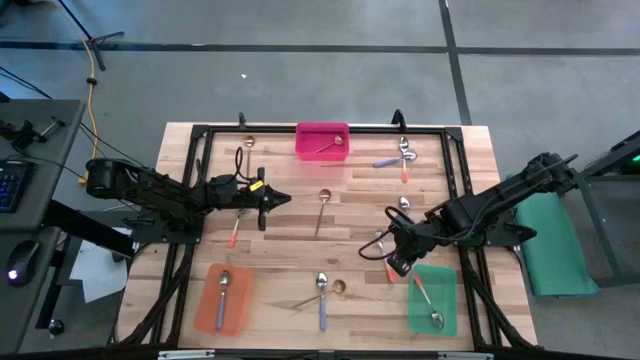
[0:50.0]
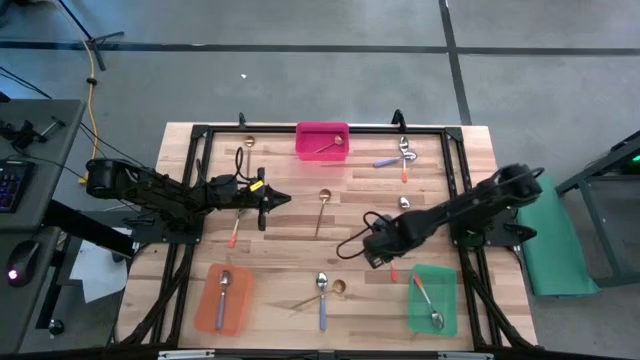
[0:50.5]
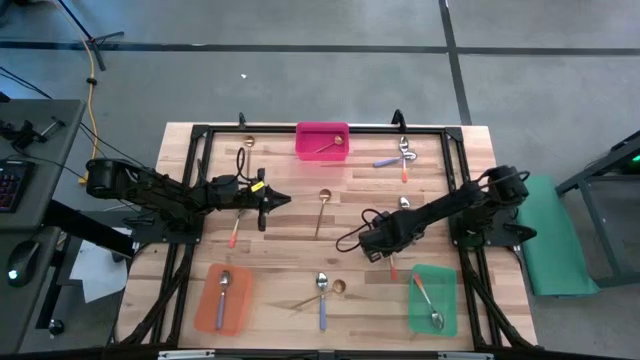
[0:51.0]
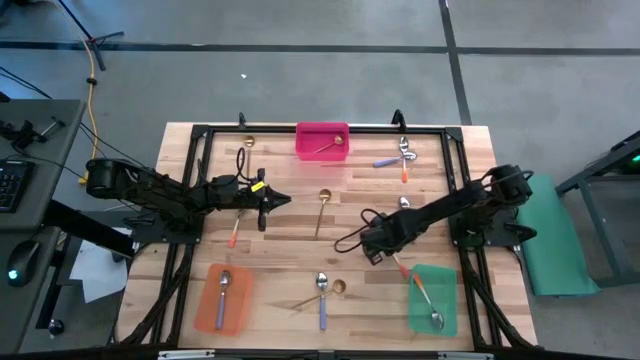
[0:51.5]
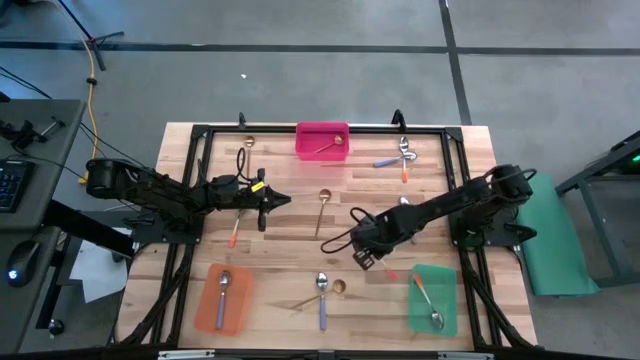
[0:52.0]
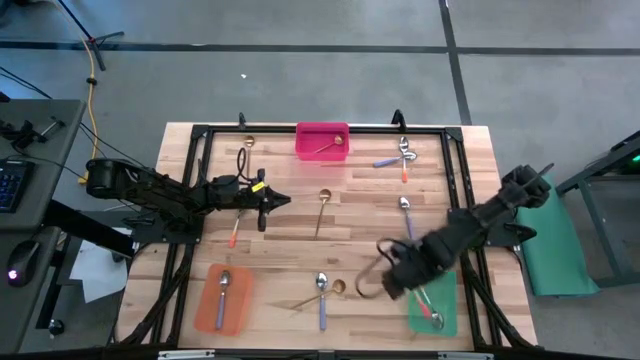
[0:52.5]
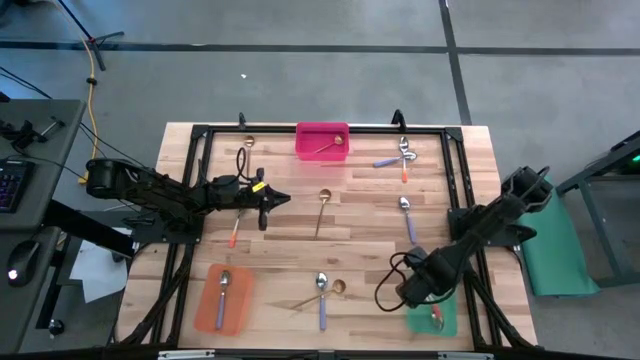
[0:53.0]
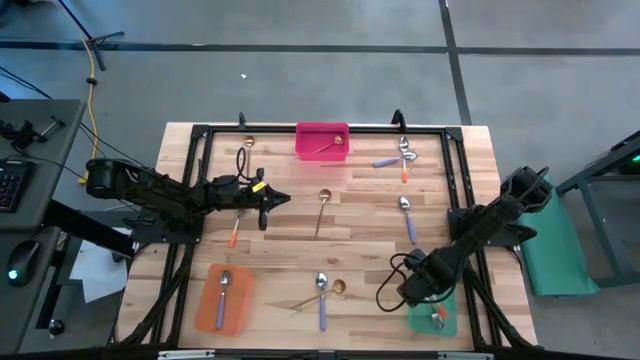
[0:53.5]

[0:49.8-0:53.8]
Task: Sort silverware by color (type)
Put the orange spoon into the green bin

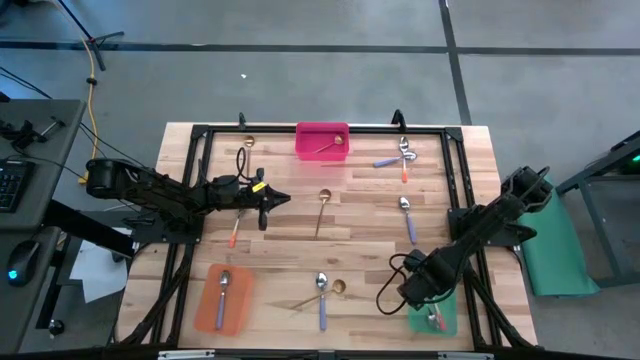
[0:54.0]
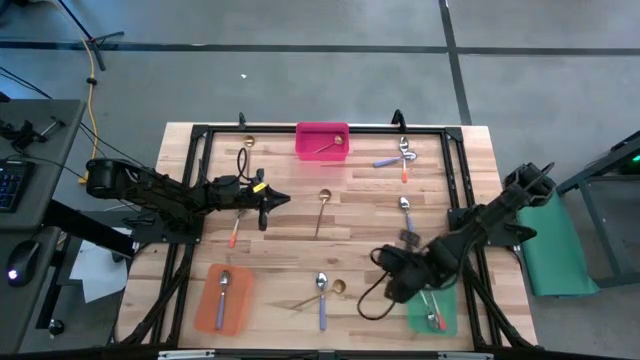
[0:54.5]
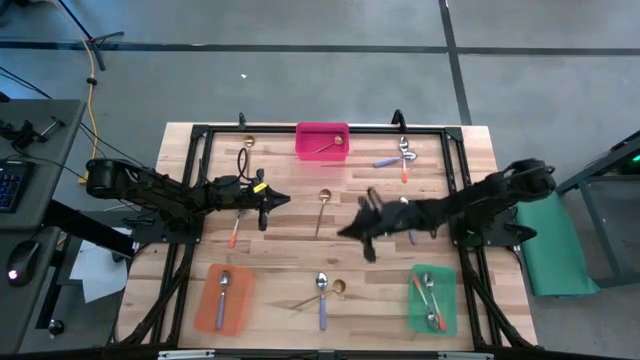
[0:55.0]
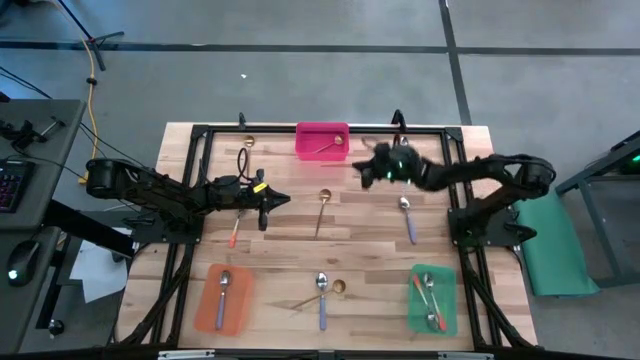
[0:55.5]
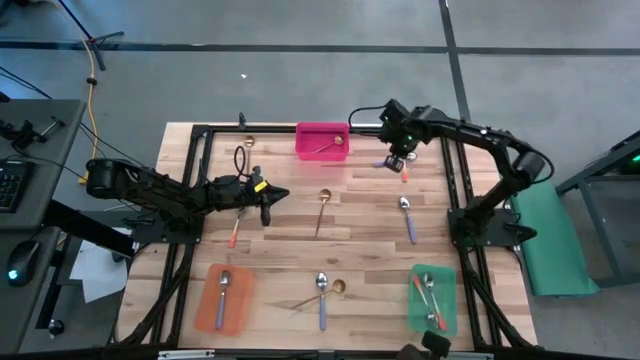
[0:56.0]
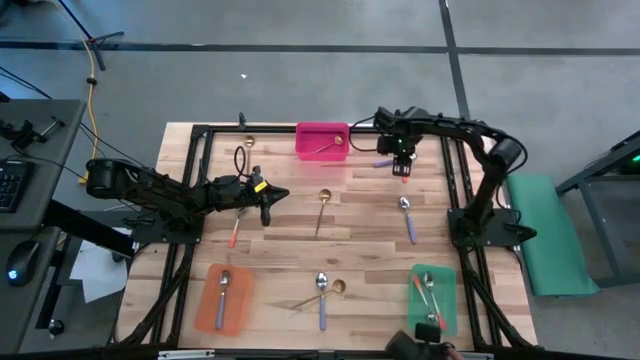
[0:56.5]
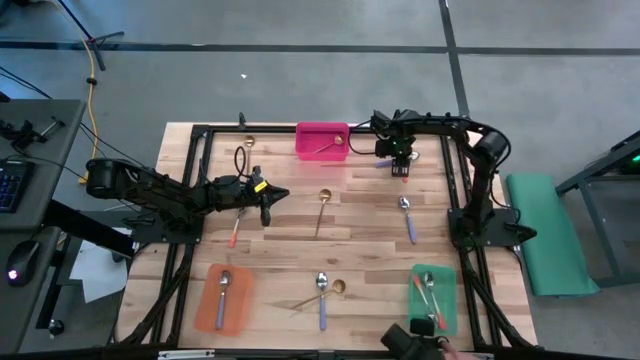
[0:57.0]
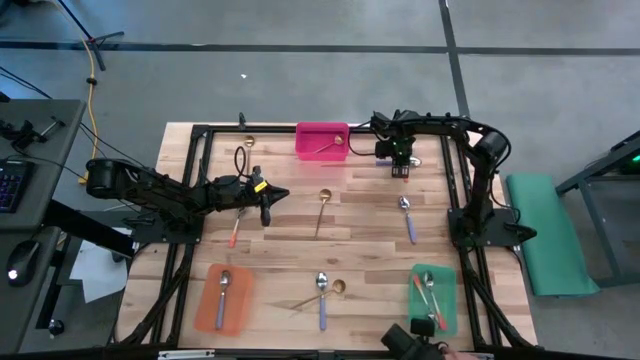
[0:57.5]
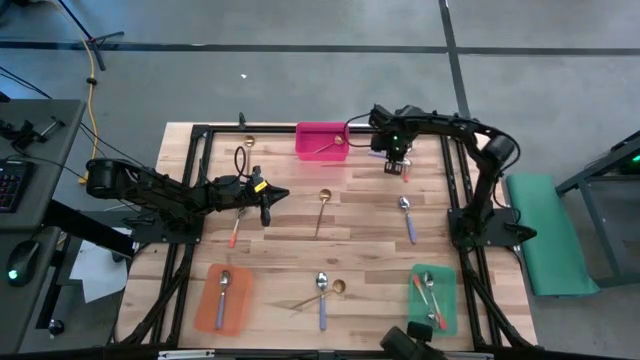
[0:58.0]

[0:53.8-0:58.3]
Put the purple spoon into the orange bin

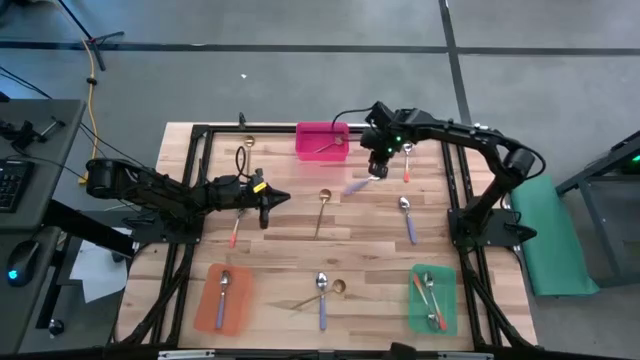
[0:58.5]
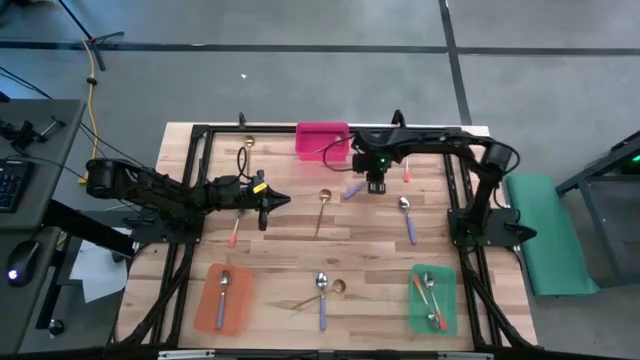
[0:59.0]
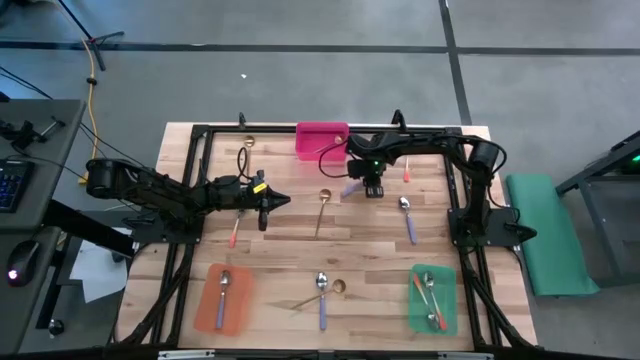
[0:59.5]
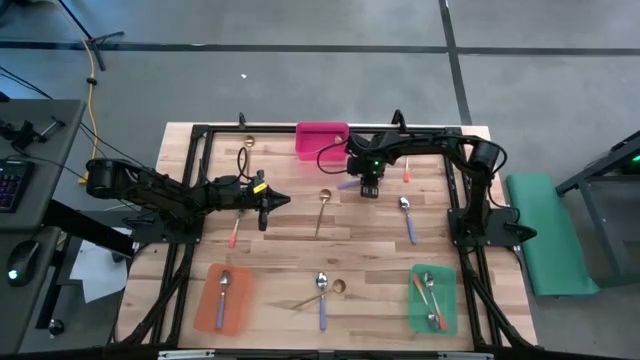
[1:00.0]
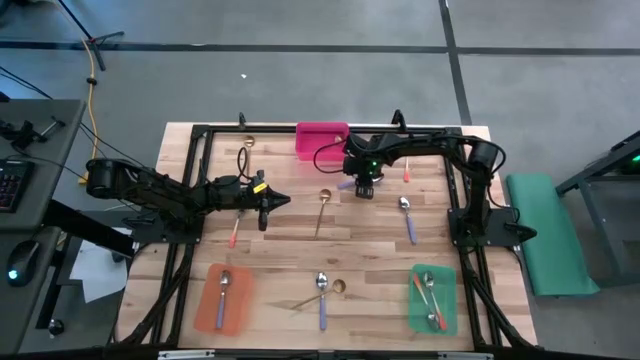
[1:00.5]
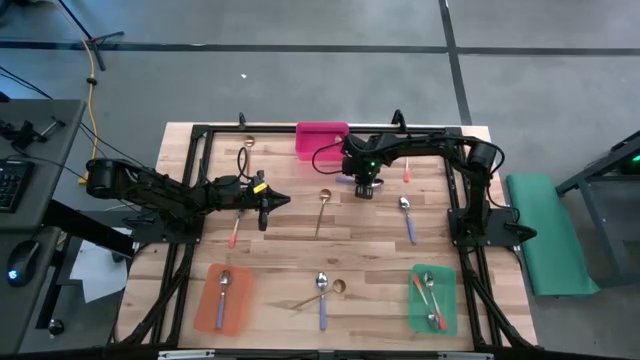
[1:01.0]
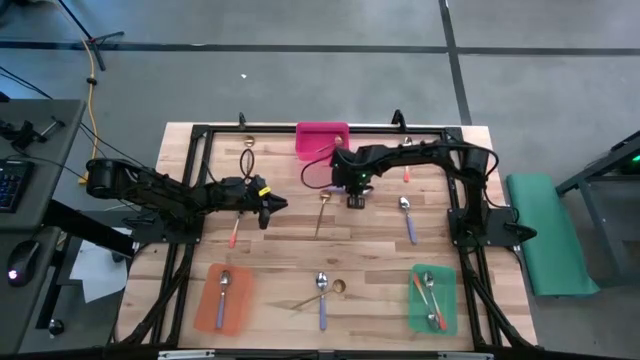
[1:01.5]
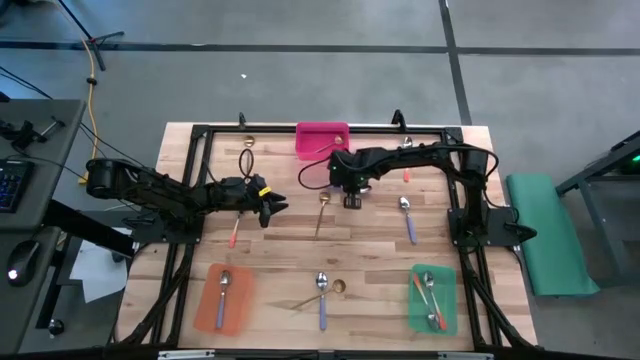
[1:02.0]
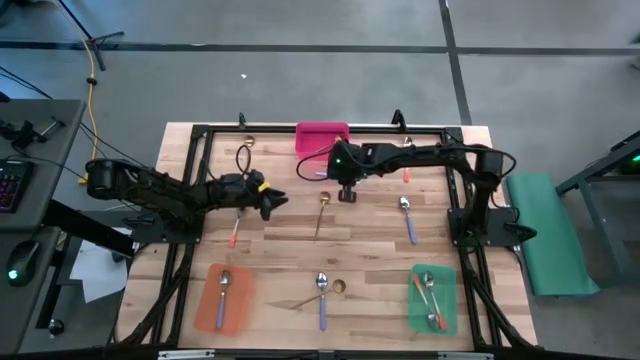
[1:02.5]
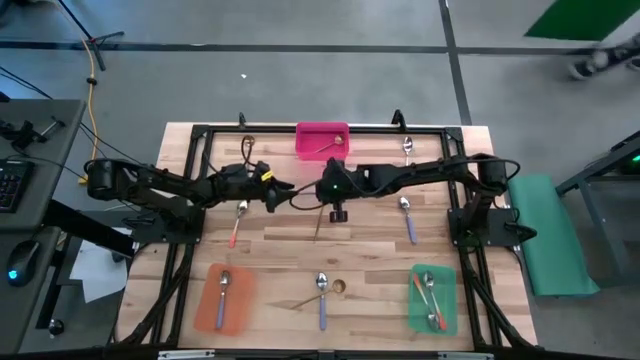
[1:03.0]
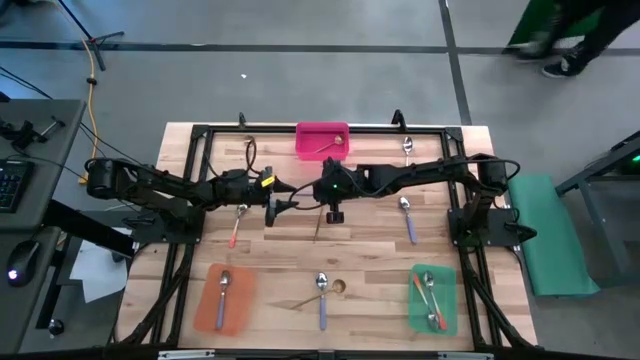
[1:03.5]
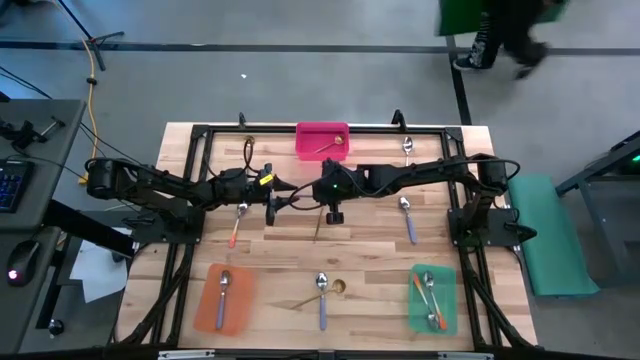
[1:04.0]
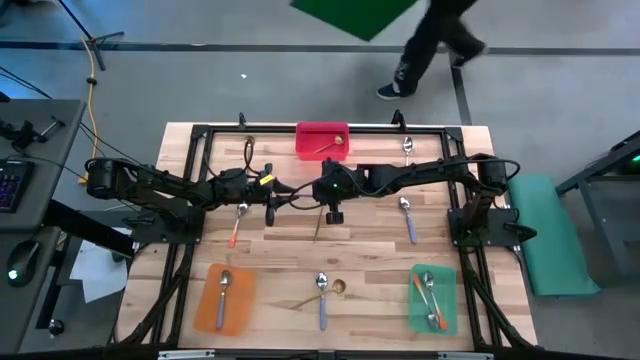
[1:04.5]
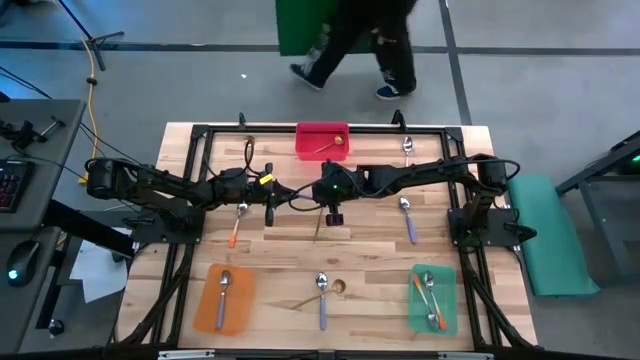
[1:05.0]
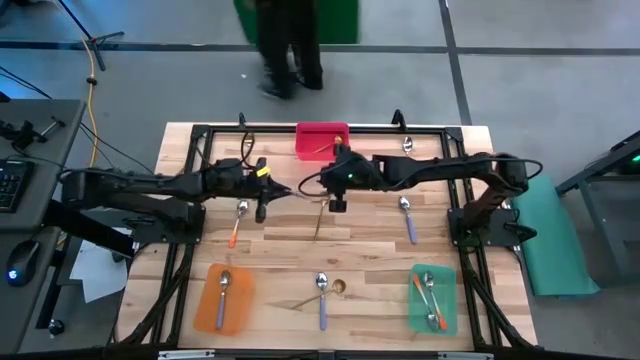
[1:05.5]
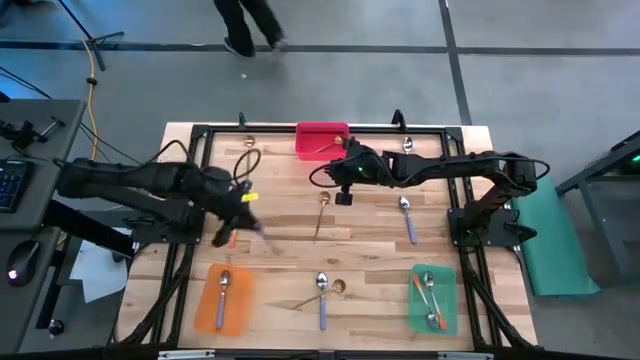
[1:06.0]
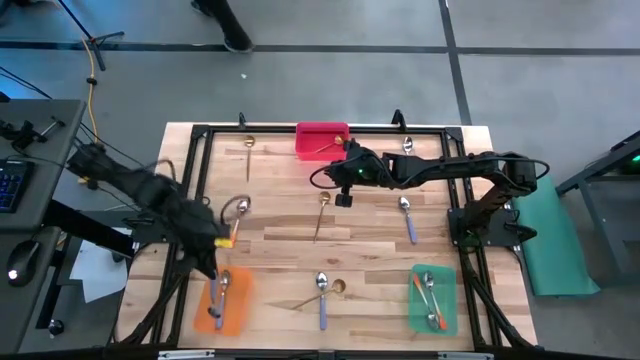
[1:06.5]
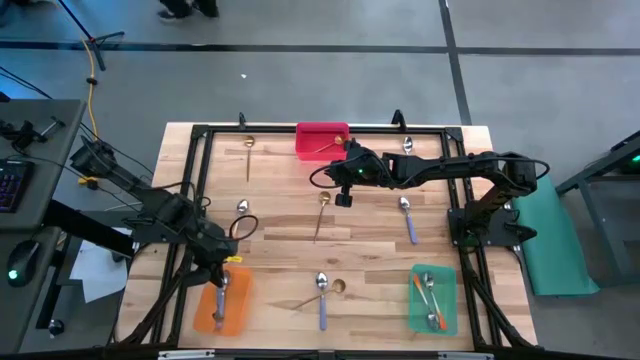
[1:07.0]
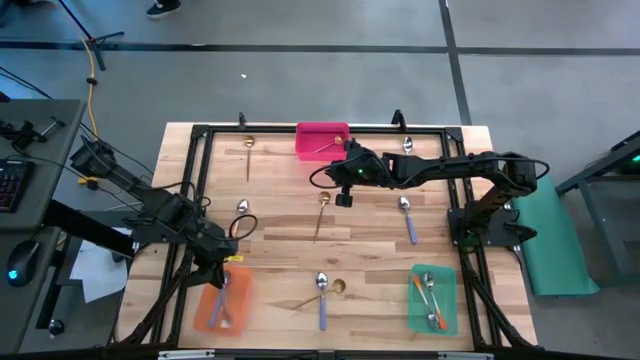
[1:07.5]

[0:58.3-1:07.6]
Put the purple spoon into the orange bin

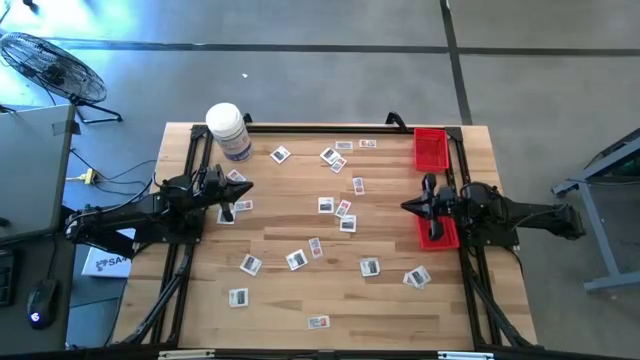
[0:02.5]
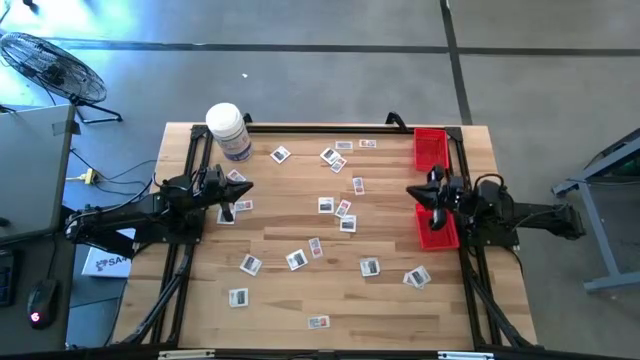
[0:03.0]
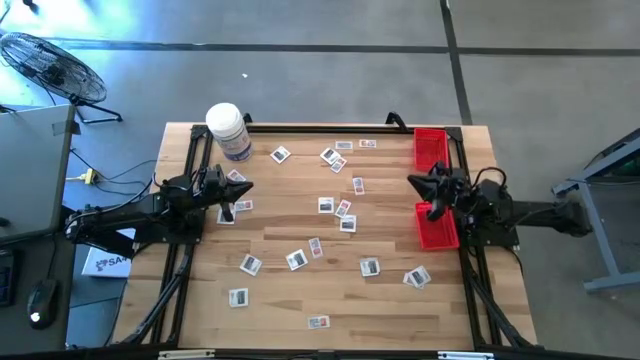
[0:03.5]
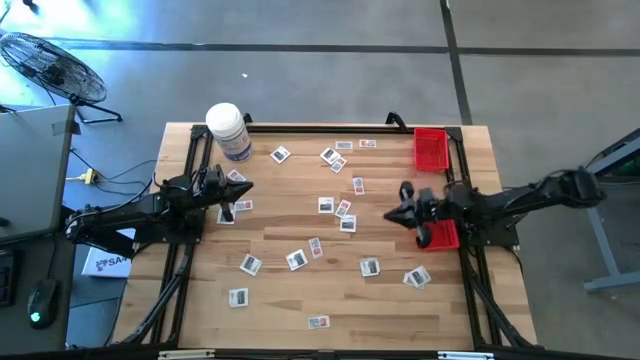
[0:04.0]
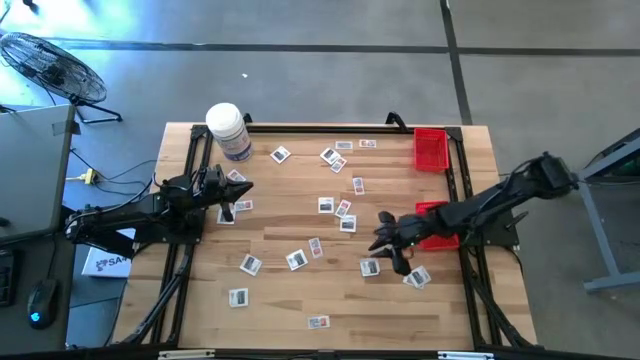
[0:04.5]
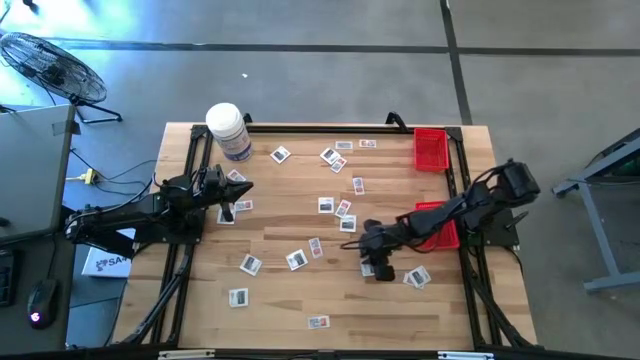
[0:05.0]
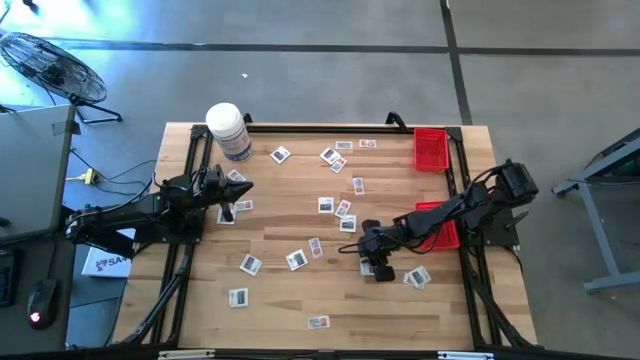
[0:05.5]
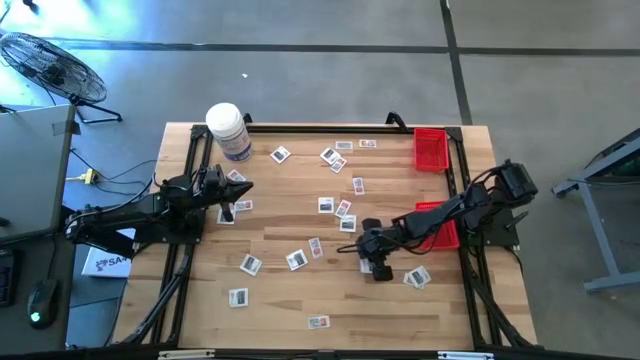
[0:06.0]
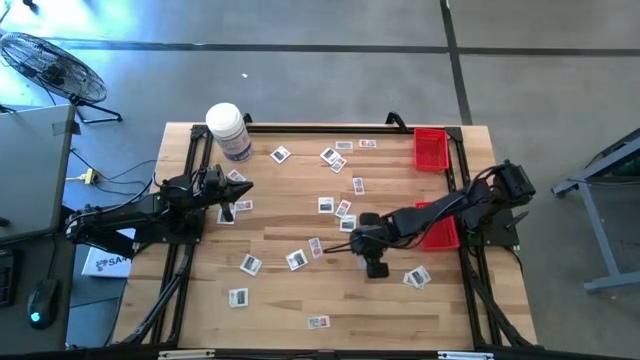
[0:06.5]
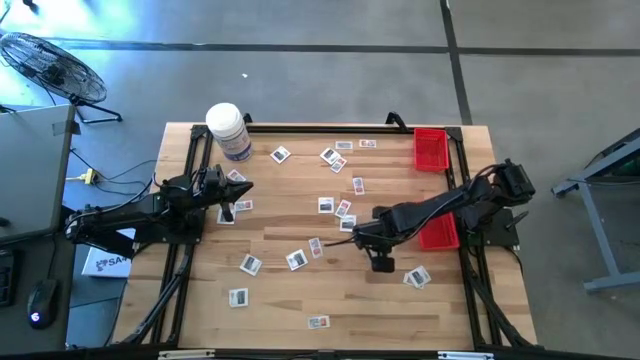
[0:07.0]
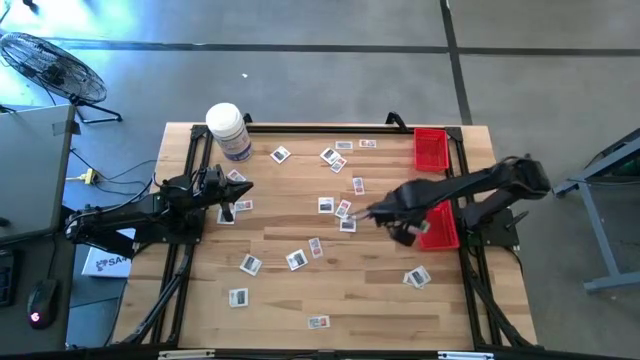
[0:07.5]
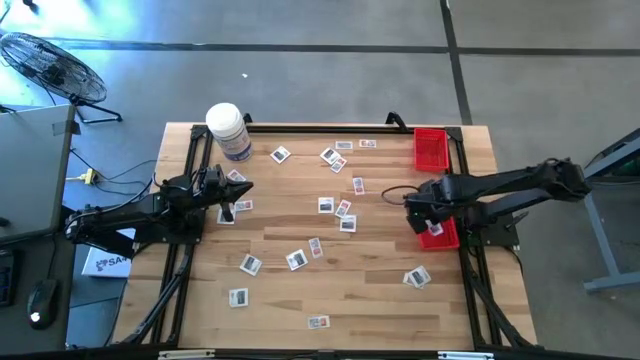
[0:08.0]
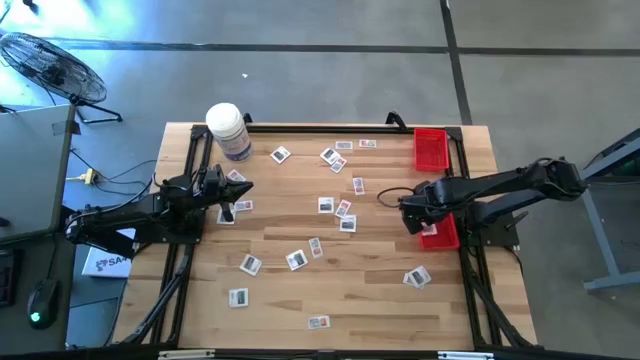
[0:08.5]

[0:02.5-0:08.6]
Task: Pick & Place First Aid Supplies
Put the towelette pack into the bottom basket
